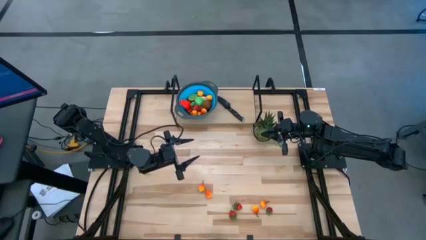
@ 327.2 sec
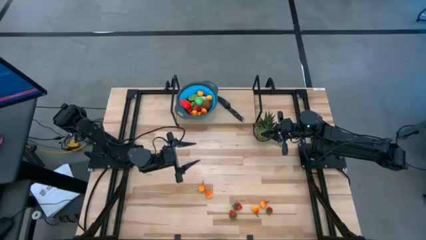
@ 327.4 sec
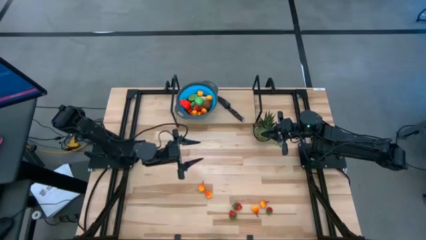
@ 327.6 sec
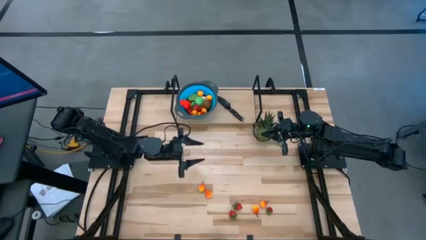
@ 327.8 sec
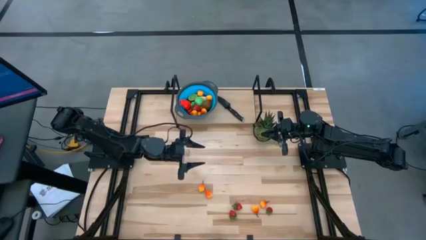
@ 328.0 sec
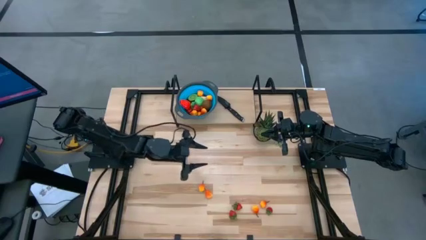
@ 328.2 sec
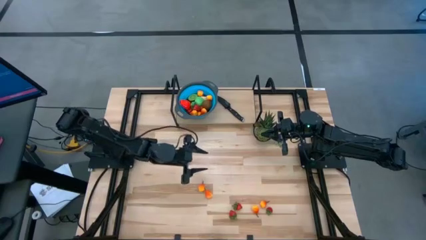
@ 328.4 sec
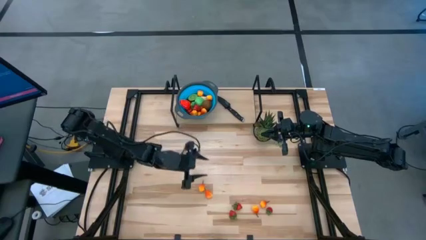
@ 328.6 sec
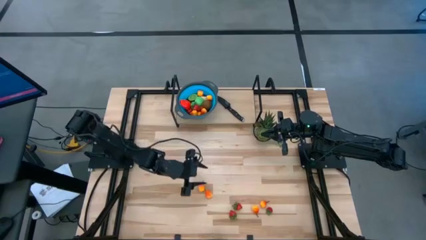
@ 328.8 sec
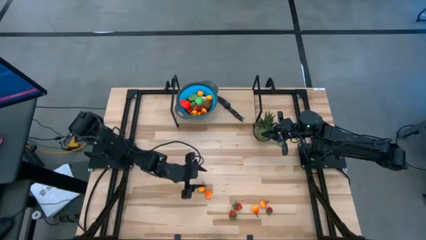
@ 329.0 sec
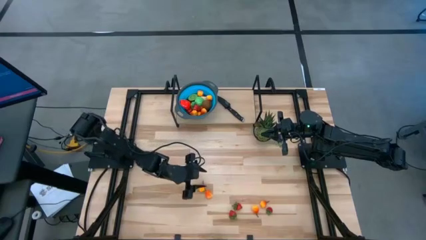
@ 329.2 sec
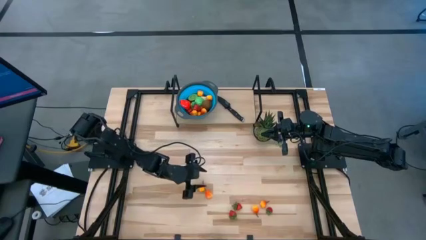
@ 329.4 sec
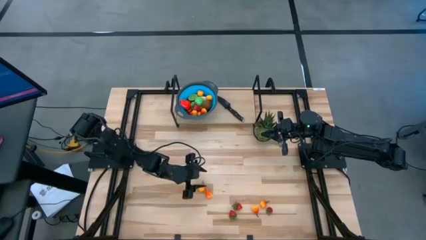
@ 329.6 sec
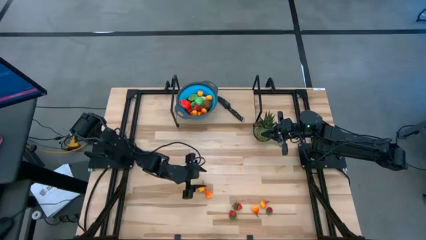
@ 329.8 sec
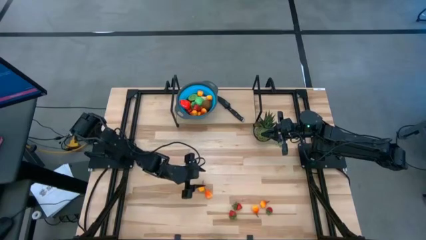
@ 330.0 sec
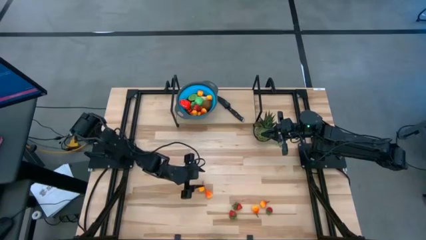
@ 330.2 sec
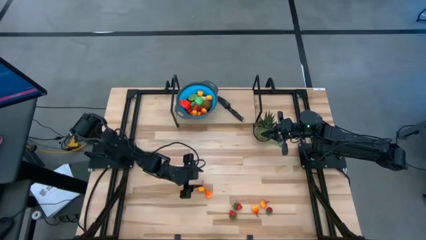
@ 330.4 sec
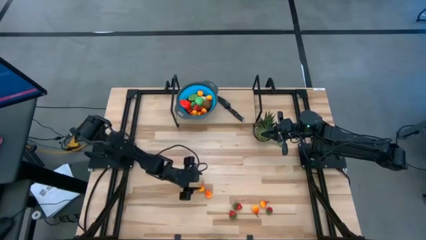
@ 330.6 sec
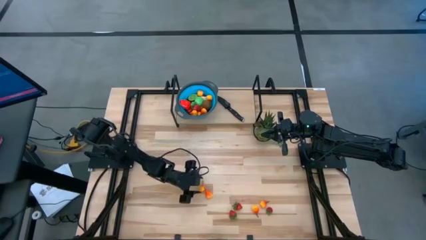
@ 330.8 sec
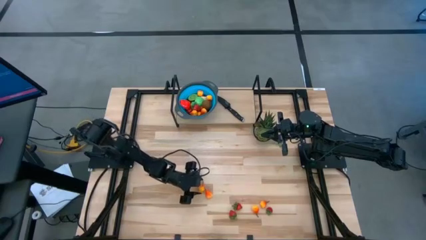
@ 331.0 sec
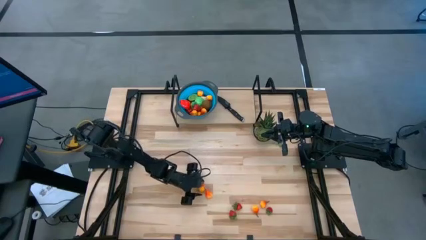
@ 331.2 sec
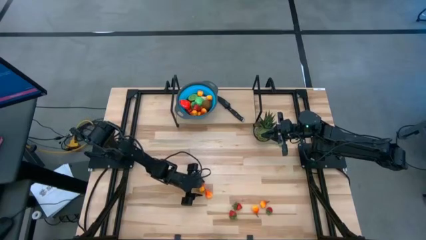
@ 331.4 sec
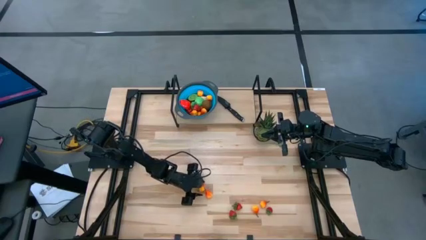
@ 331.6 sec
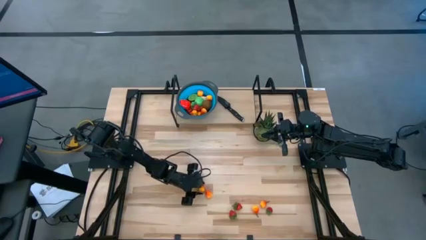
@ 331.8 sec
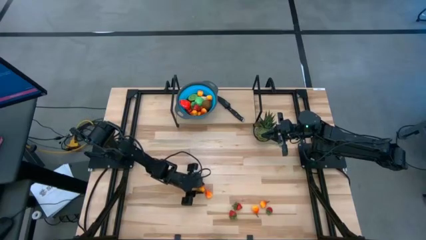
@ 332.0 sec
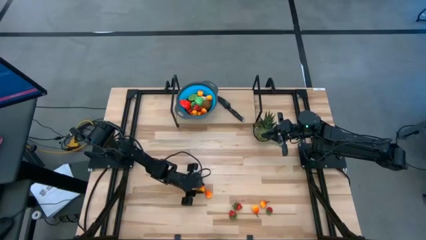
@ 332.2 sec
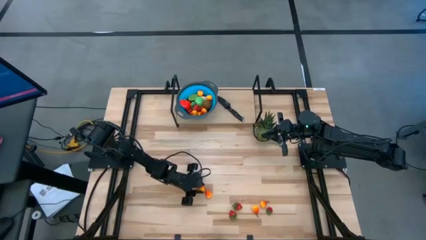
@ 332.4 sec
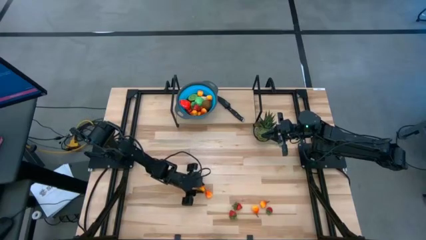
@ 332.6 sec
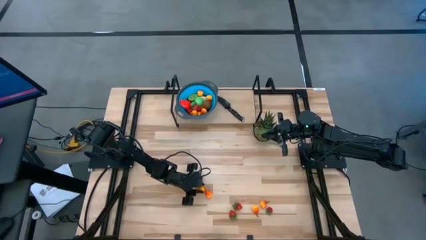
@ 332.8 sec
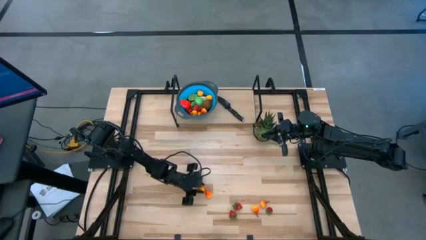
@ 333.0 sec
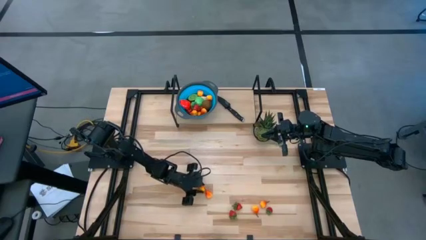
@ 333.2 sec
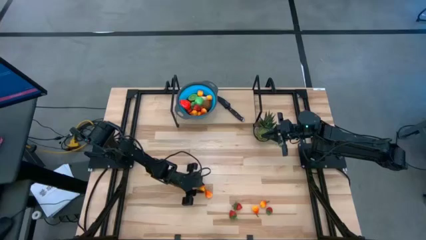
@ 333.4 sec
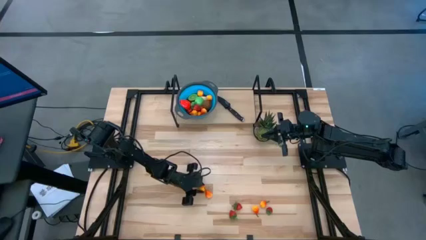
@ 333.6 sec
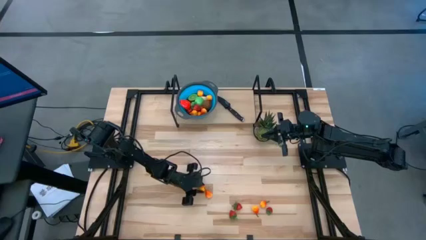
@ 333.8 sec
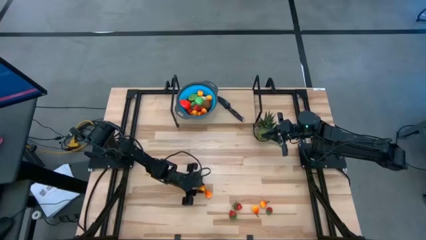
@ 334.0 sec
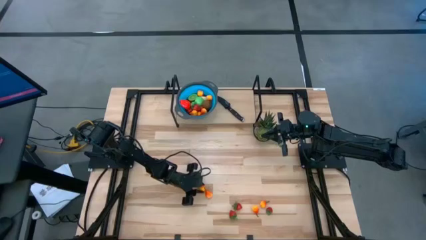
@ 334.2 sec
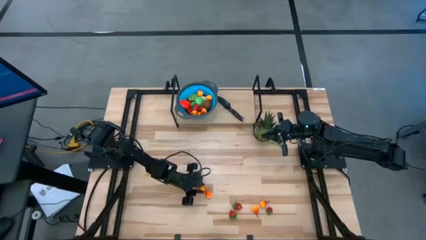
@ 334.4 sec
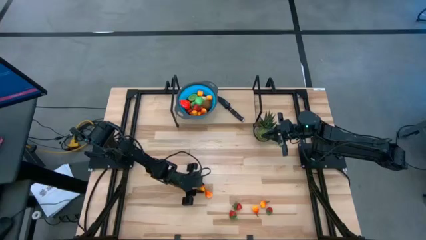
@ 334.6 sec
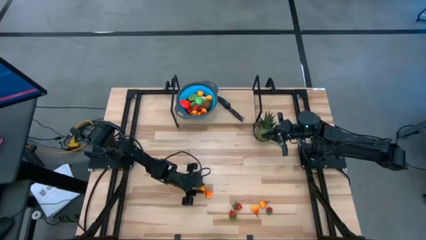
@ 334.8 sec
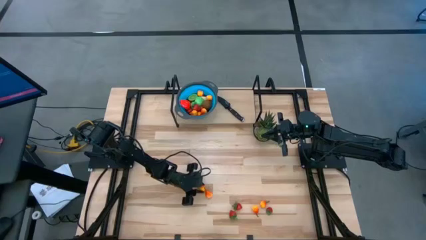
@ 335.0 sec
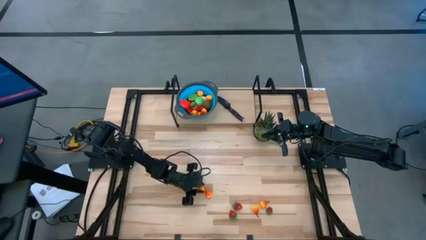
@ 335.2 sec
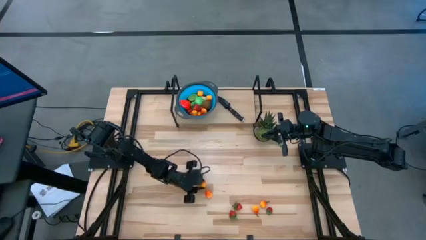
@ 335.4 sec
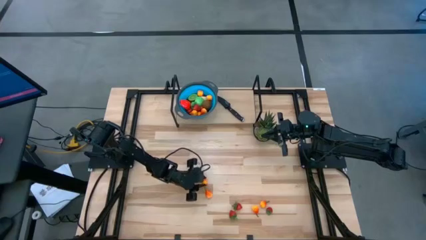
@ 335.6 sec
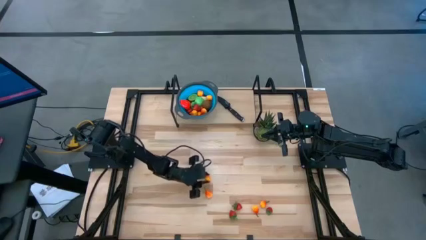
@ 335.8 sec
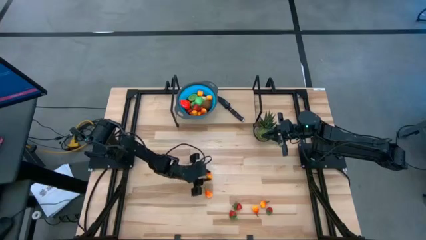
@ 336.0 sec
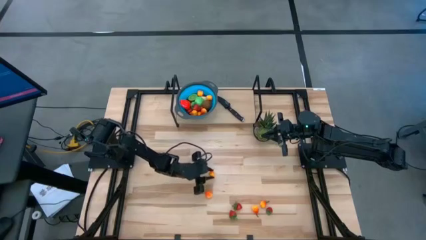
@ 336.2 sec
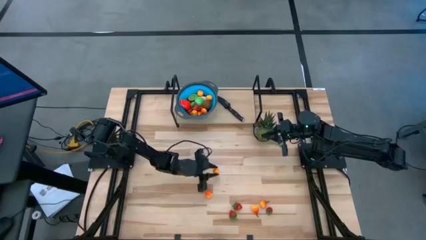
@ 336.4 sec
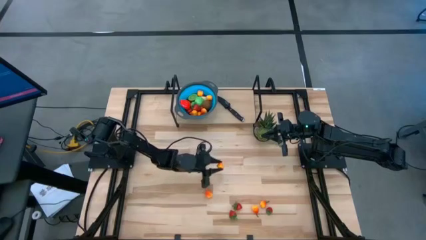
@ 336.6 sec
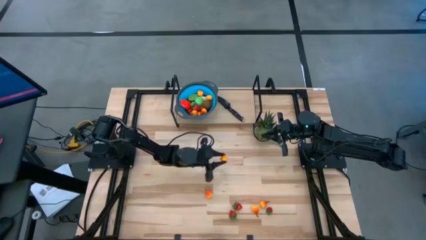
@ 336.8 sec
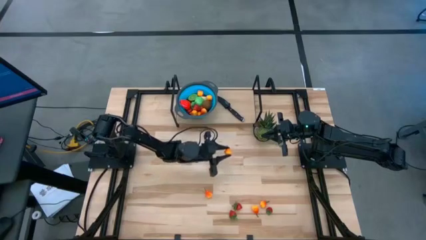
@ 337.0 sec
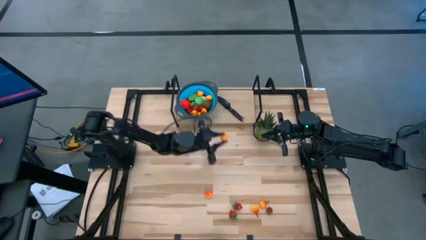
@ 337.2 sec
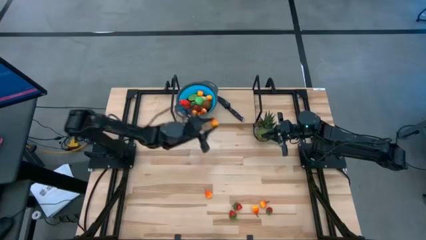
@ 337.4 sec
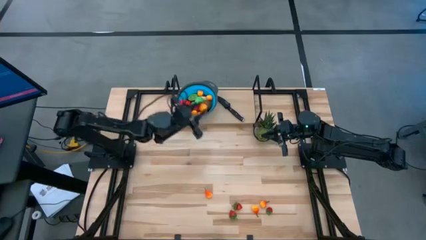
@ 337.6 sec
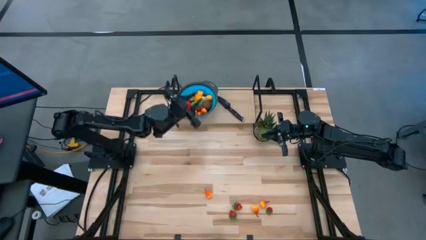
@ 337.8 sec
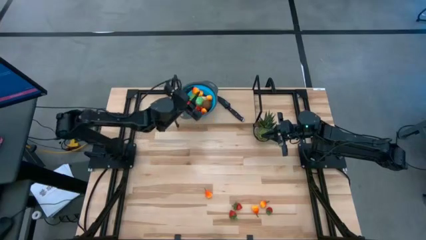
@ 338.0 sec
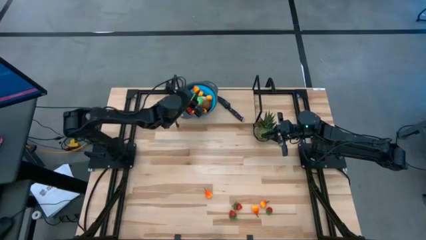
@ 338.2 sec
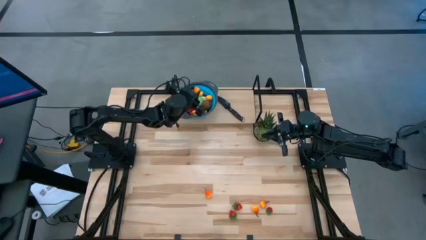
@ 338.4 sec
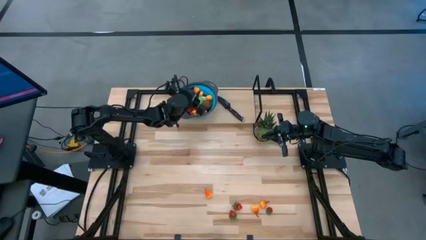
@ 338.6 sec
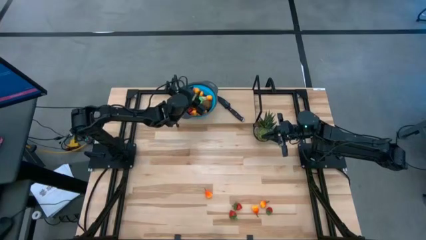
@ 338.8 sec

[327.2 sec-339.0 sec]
Task: Pick & Place Fruit
Put the pear into the basket

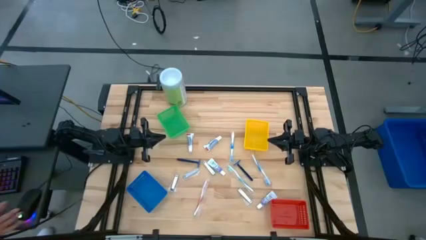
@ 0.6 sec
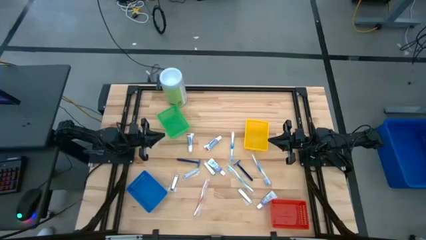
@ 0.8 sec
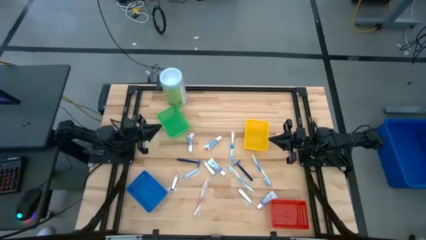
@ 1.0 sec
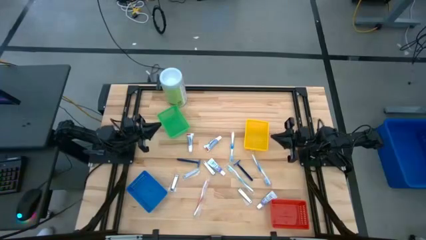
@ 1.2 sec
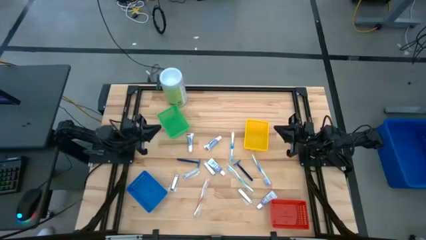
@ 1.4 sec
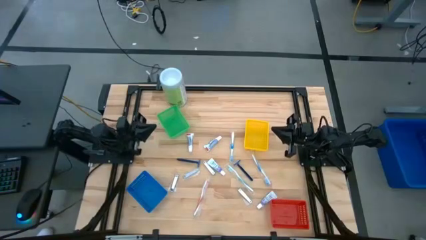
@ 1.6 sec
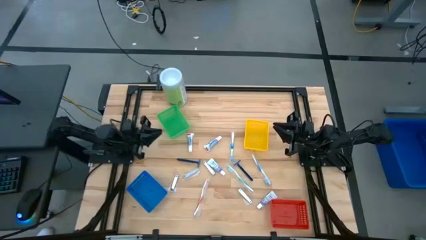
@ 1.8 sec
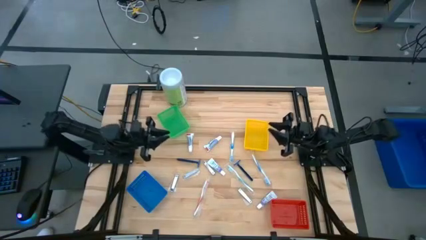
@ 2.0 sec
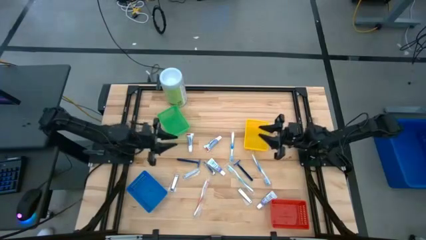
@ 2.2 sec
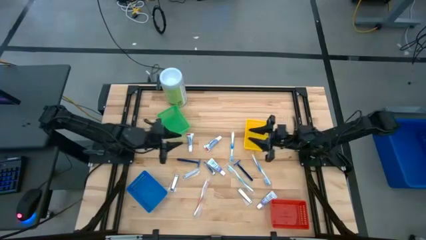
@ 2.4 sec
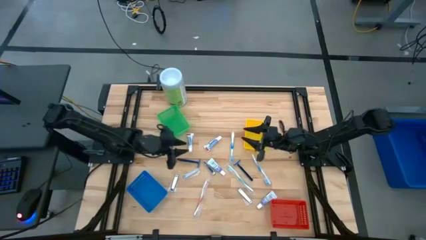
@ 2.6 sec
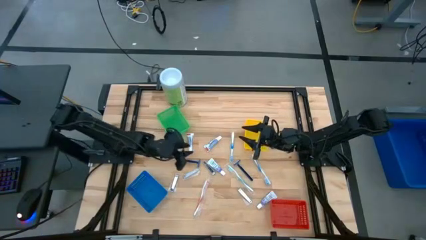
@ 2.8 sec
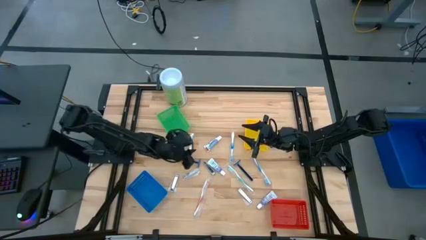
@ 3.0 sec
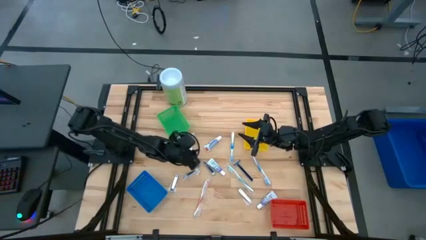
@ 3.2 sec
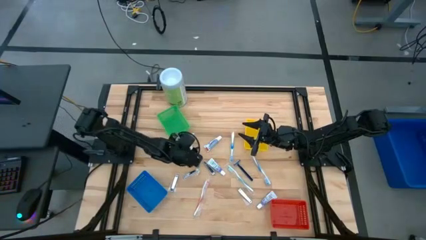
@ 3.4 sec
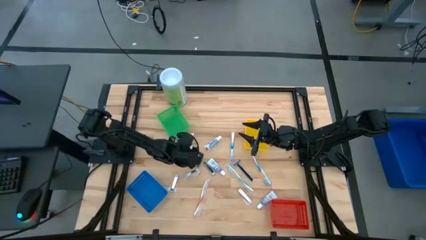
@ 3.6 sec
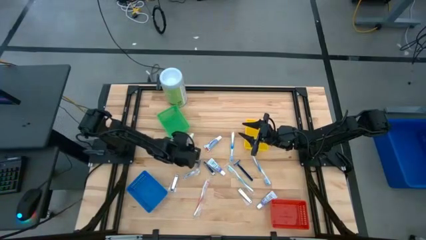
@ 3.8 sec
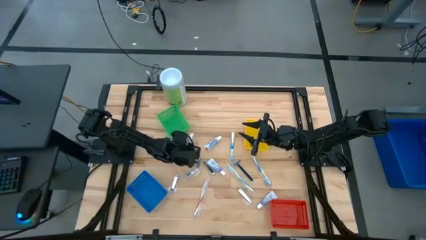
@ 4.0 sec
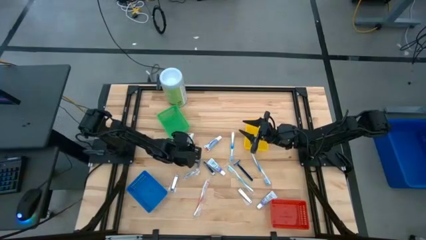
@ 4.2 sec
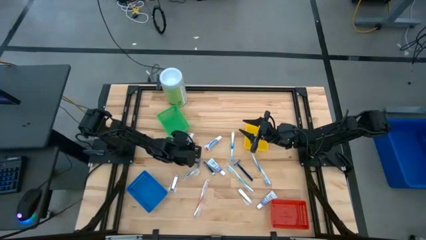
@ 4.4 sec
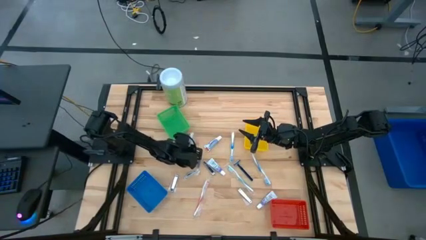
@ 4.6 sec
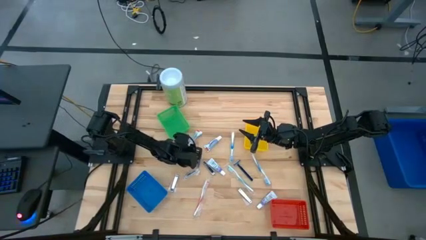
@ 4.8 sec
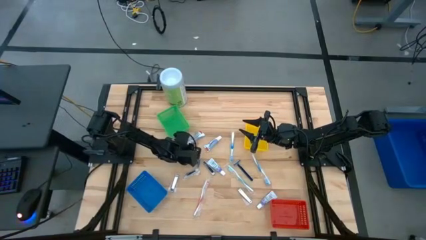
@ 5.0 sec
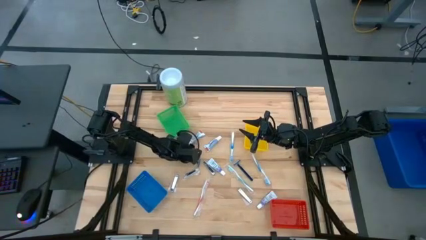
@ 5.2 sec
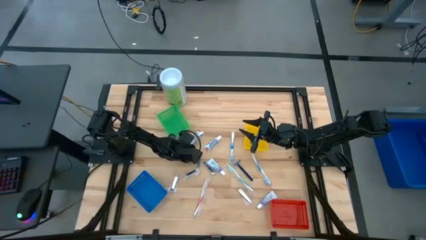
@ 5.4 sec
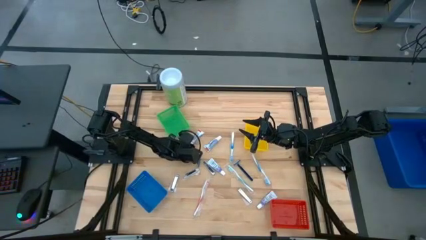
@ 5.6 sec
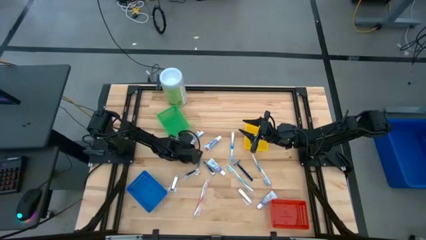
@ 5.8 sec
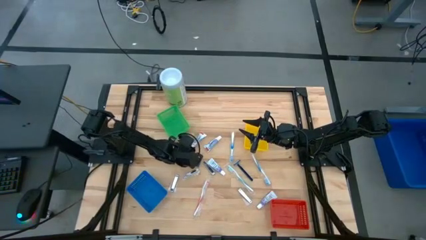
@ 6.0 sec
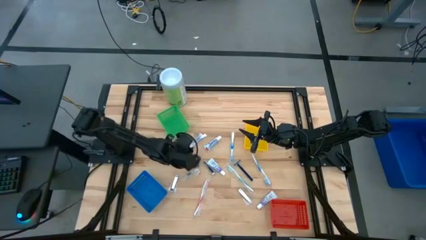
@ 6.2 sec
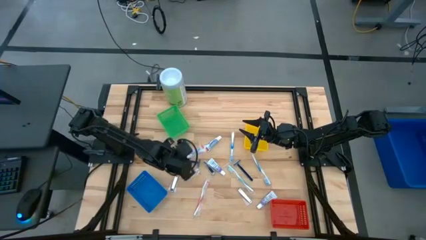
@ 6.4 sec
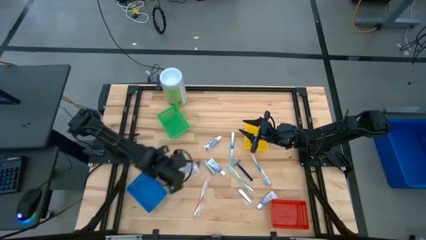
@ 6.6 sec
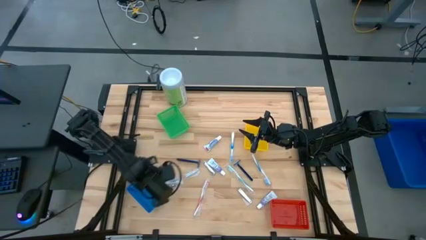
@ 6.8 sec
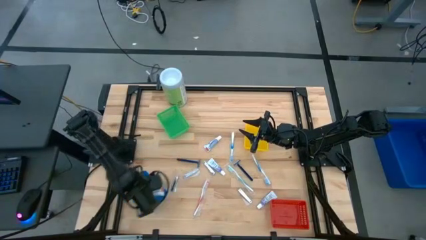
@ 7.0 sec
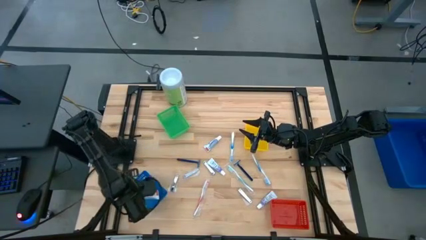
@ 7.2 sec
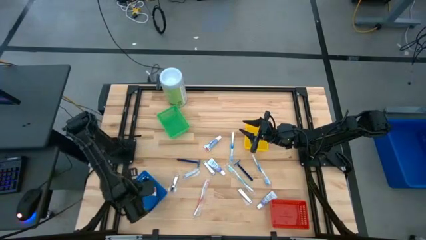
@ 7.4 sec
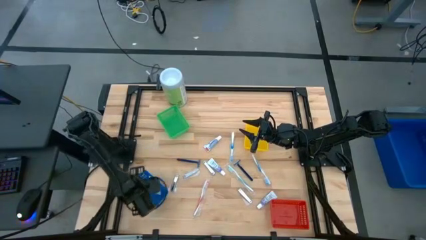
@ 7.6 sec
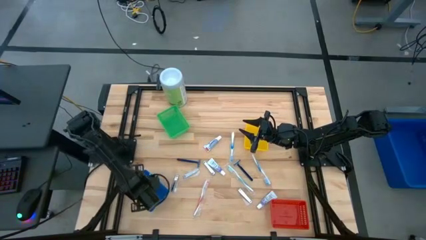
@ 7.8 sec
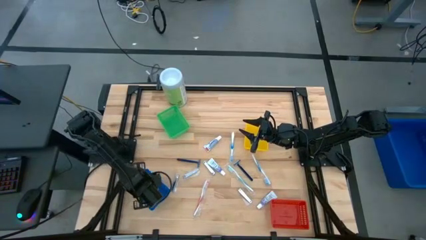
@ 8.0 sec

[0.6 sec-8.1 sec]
Task: Pick & Place Travel size toiletries
Put the toothpaste into the blue bin
